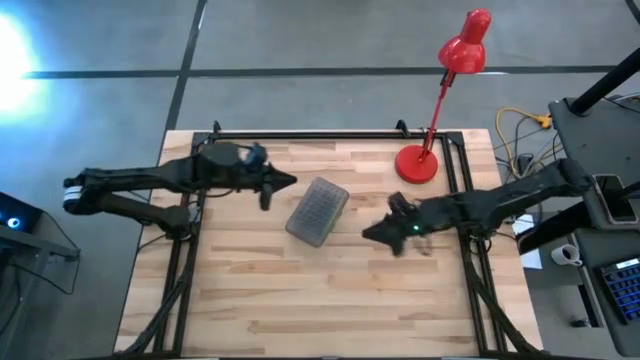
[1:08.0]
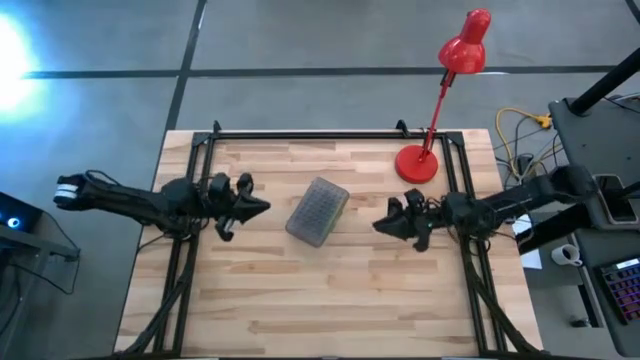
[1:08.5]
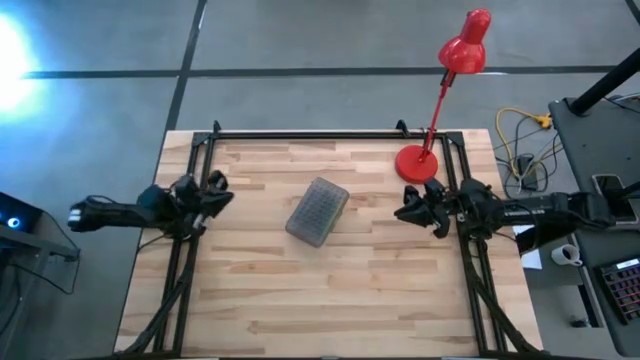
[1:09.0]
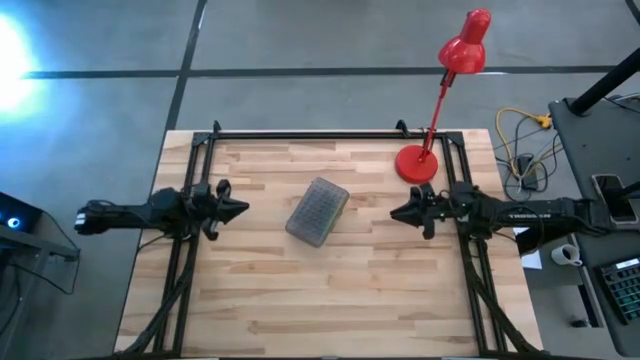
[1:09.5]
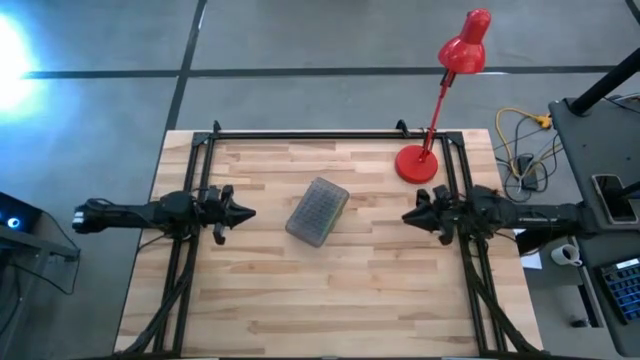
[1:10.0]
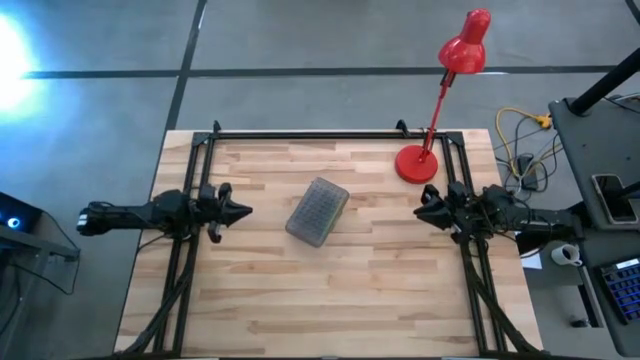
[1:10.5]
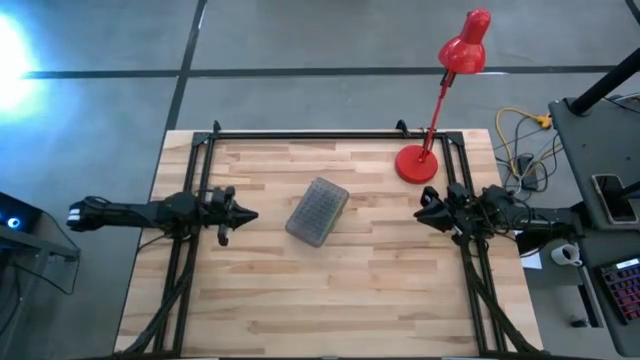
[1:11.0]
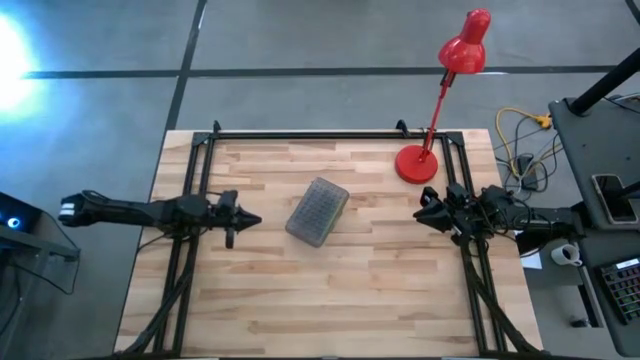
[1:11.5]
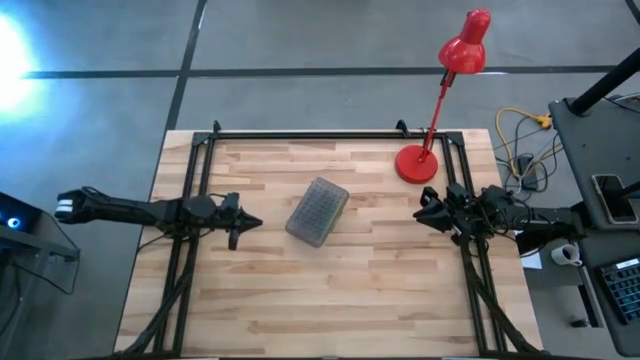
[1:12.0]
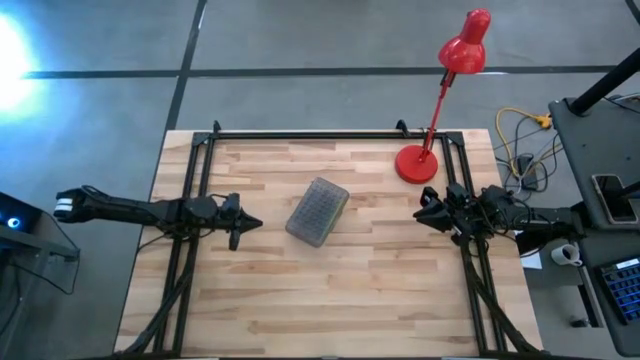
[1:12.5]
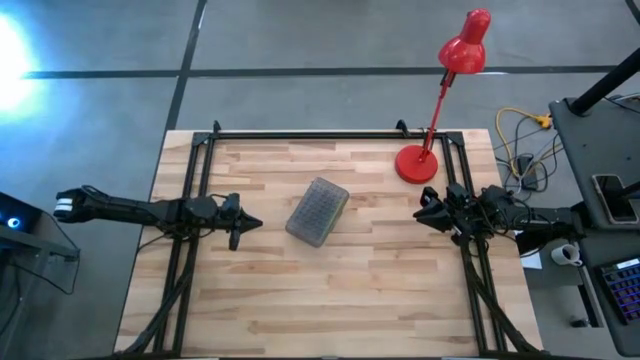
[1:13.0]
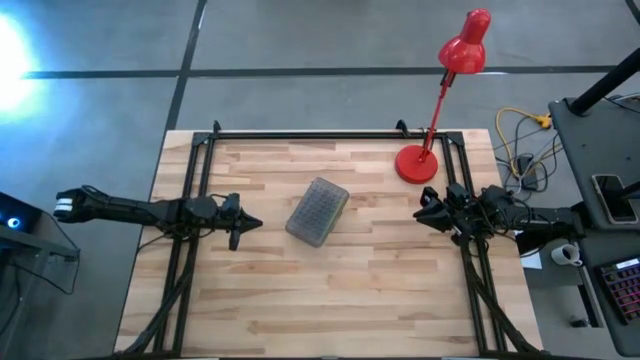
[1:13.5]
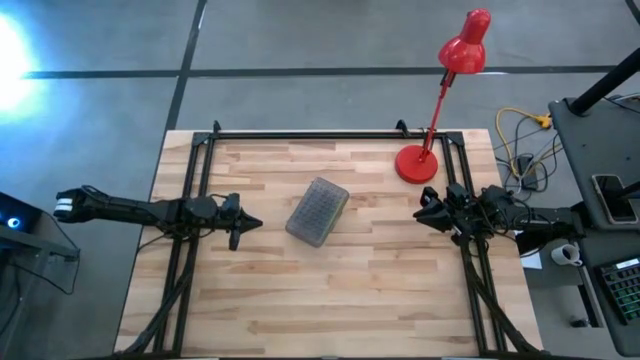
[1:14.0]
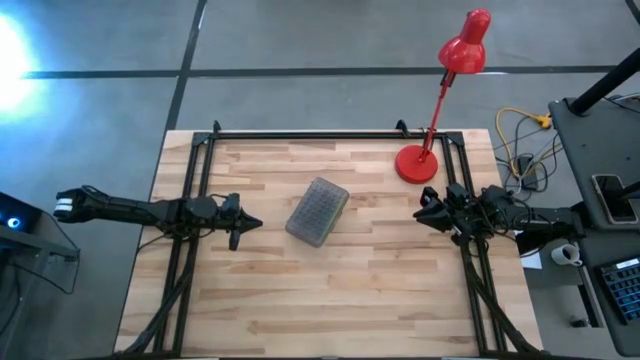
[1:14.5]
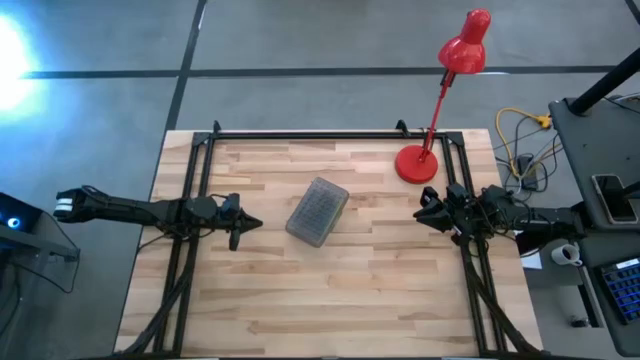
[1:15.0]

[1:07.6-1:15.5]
Task: Pick & place school supplies into a supply box
Return to Home Position

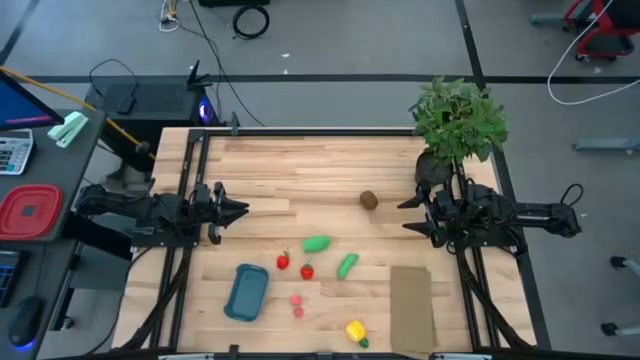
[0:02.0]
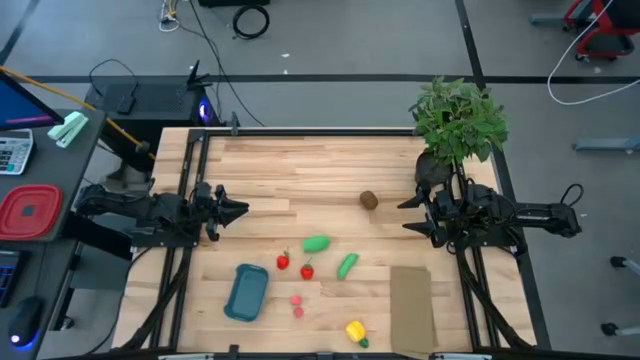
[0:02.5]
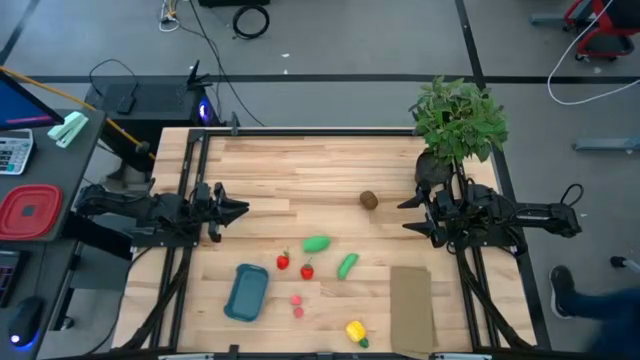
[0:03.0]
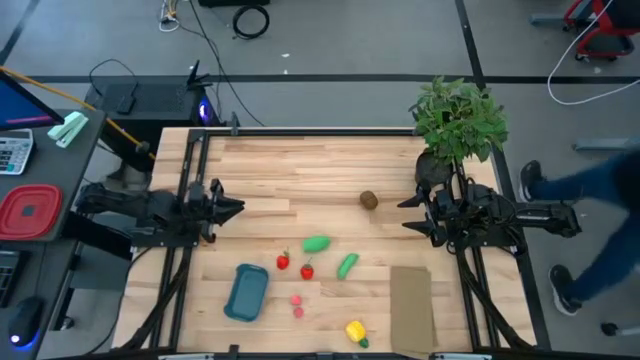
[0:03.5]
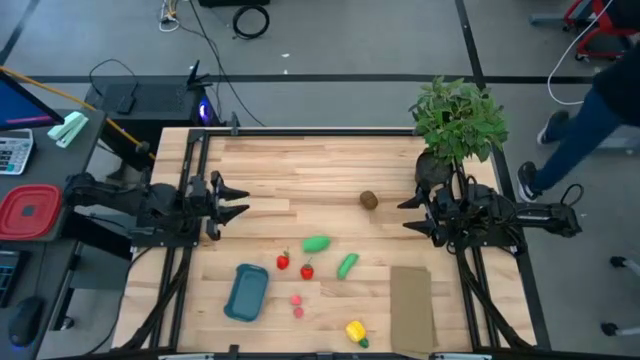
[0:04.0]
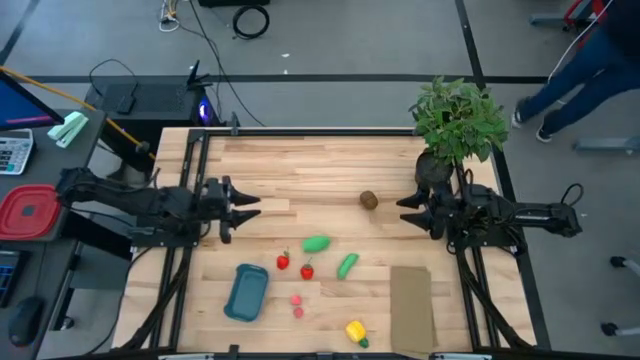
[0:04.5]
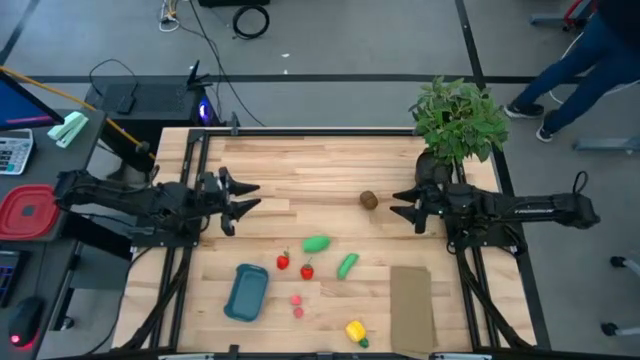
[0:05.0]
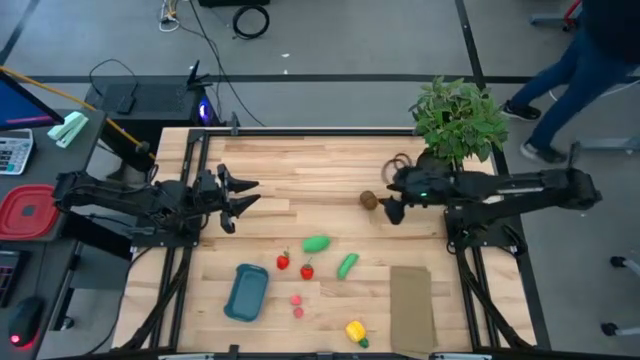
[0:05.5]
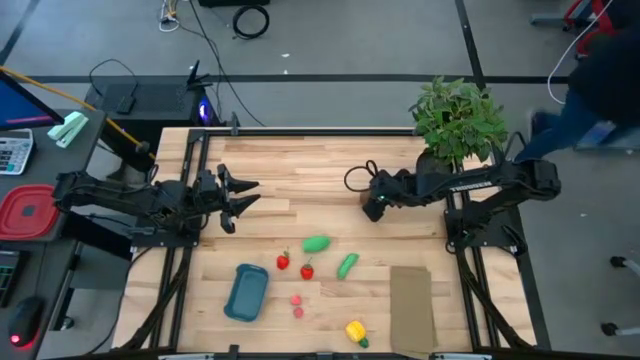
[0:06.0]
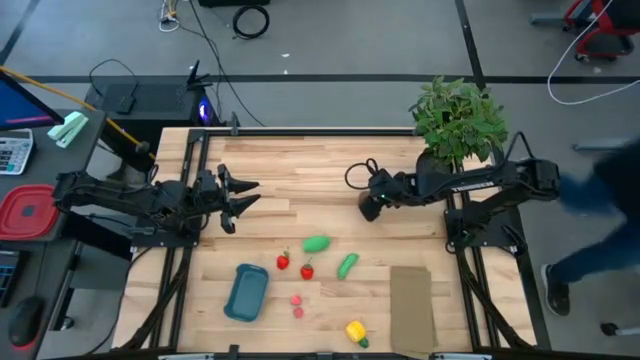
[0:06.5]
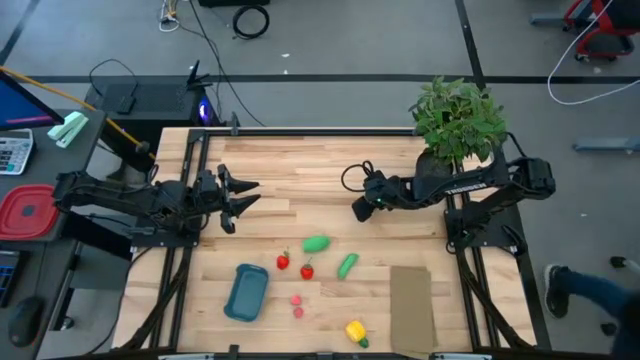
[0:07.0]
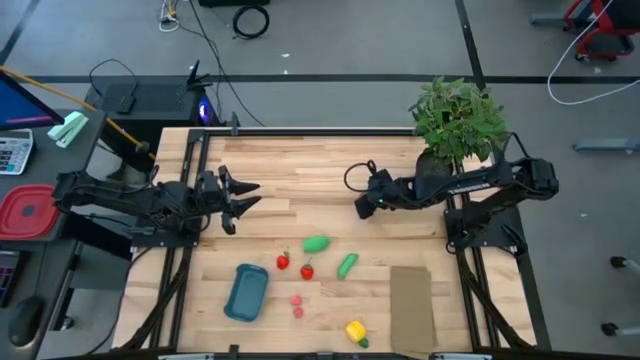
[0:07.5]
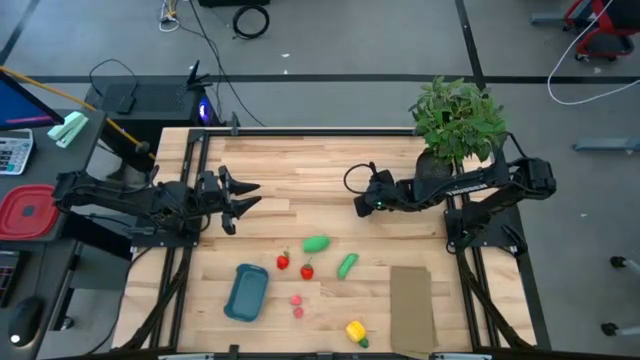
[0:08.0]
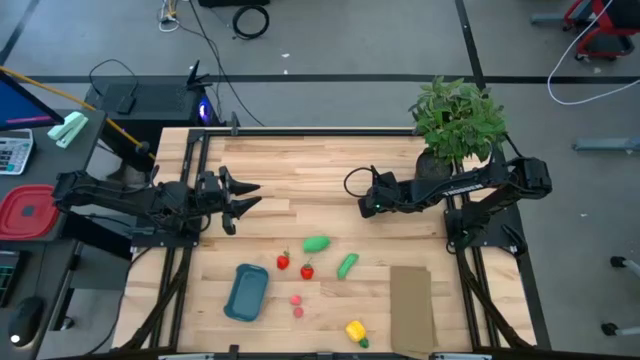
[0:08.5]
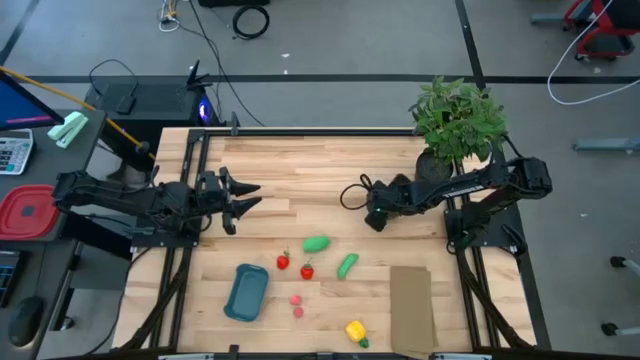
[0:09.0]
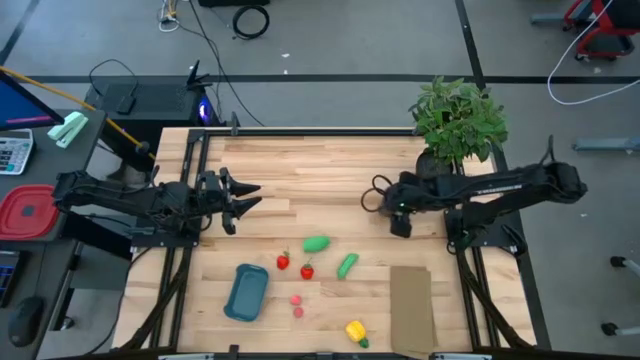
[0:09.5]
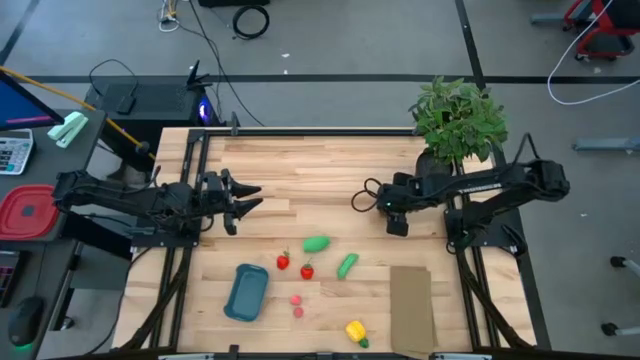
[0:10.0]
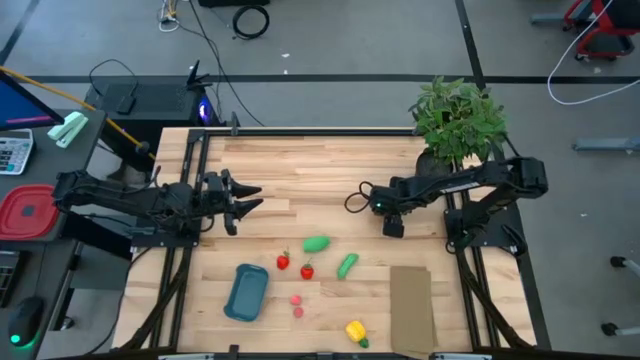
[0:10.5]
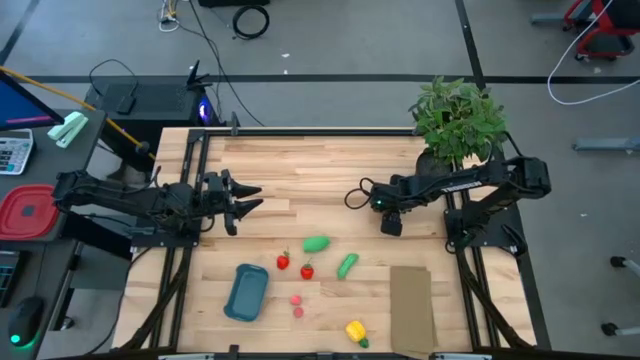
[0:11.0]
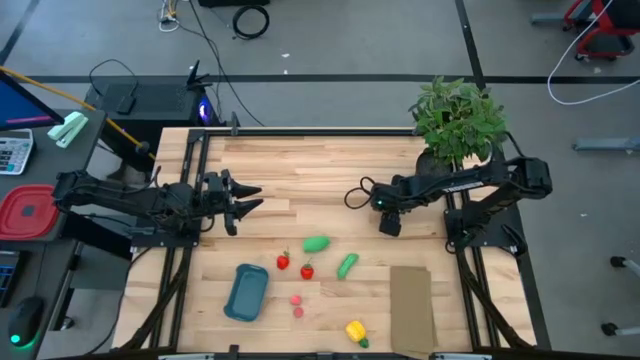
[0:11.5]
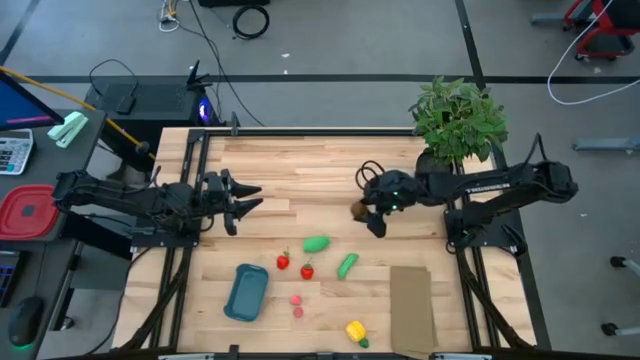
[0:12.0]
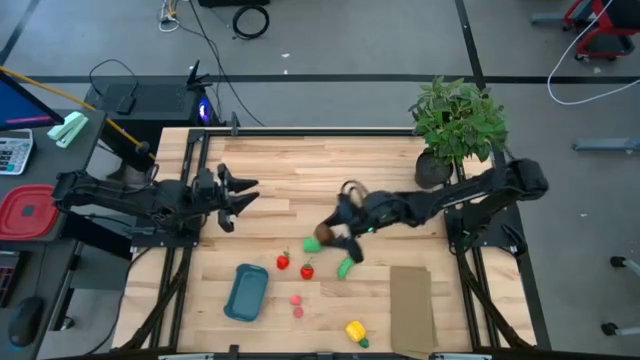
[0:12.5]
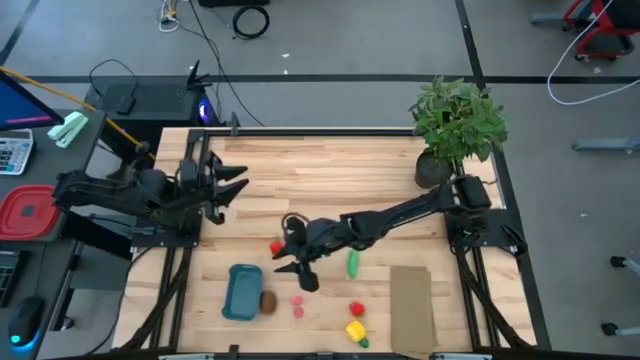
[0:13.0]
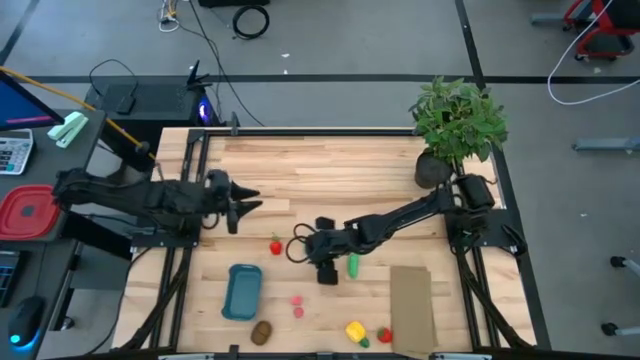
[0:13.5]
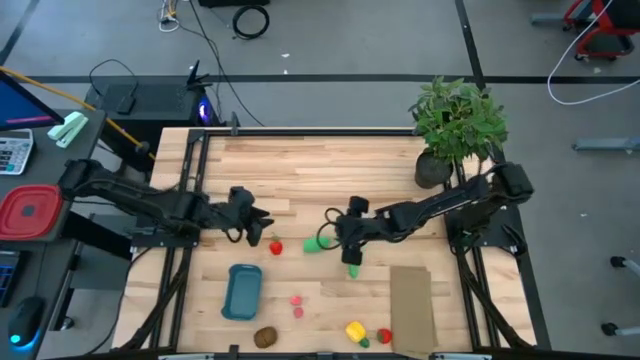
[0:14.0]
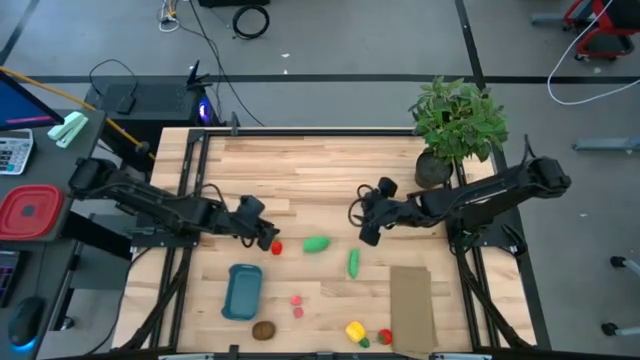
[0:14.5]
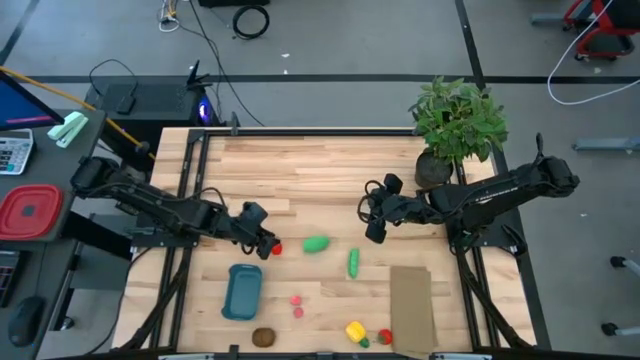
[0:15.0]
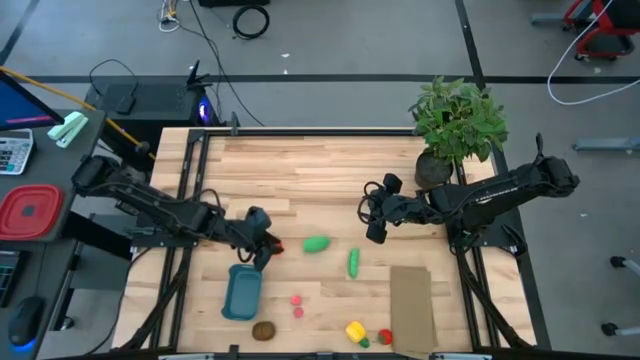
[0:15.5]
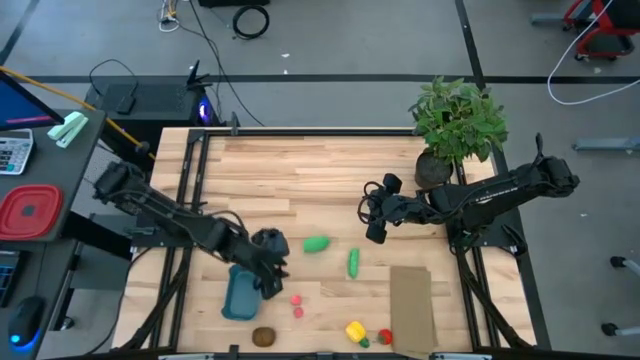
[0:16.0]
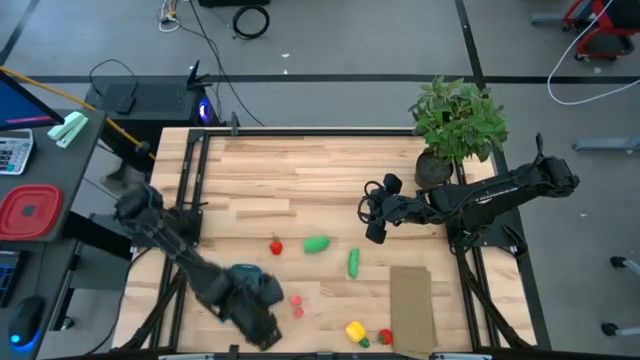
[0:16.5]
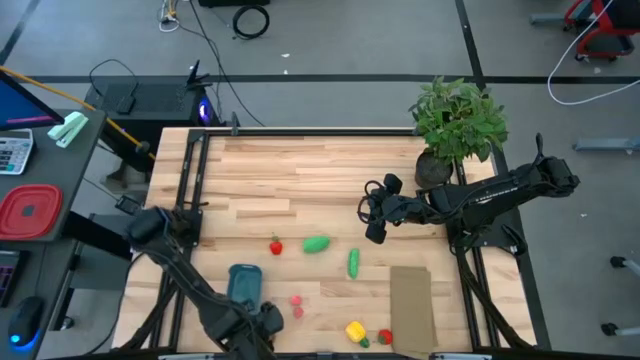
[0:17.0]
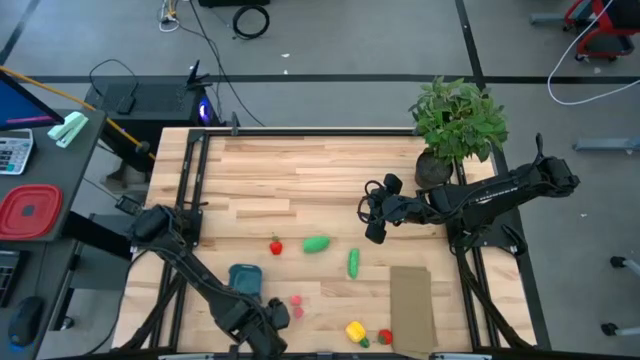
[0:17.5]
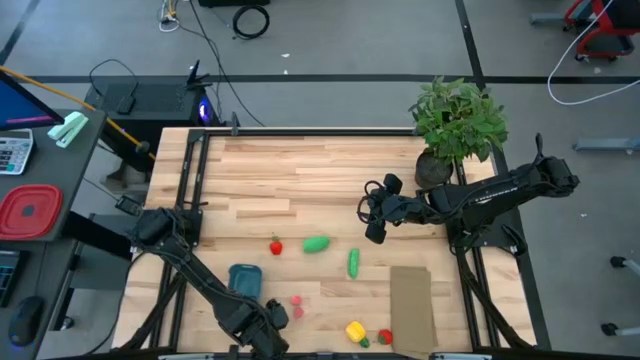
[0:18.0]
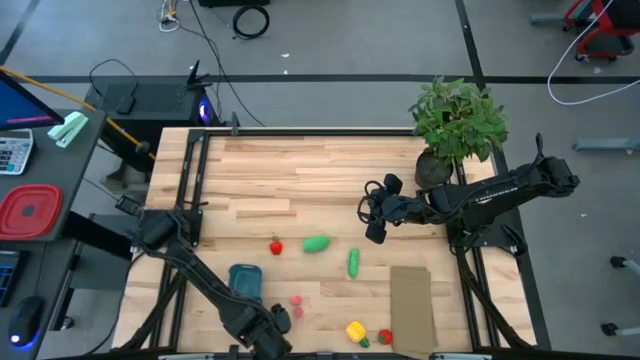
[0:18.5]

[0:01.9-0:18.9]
Task: Pick and placing Produce into tupperware
Put the brown kiwi into the blue bin
